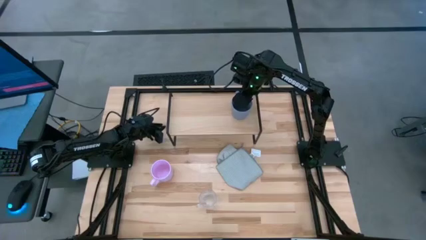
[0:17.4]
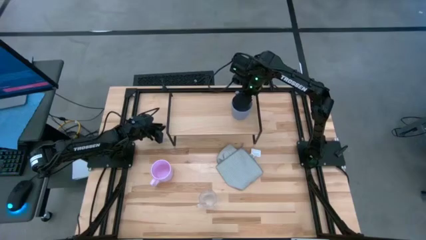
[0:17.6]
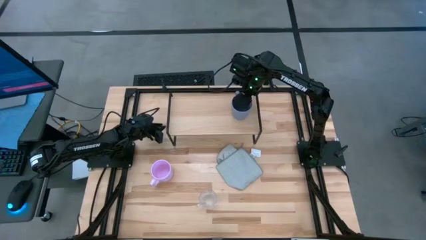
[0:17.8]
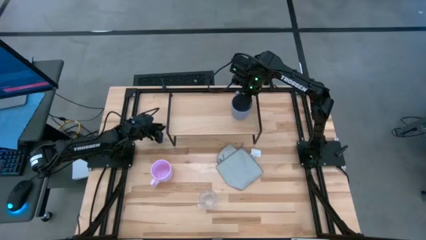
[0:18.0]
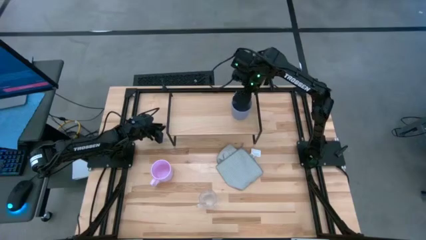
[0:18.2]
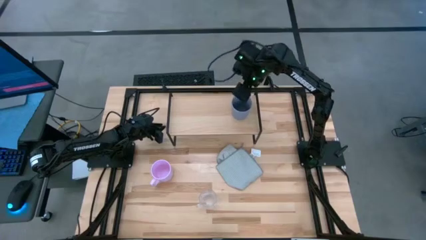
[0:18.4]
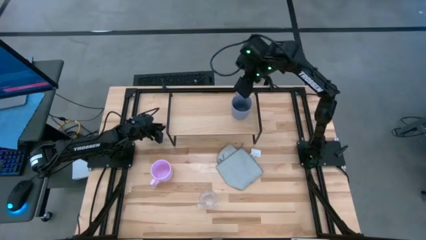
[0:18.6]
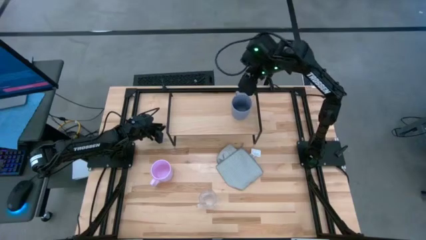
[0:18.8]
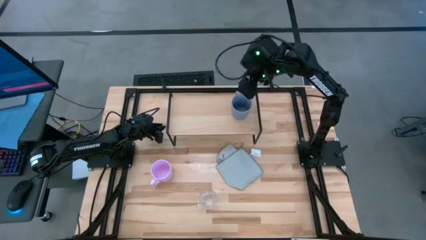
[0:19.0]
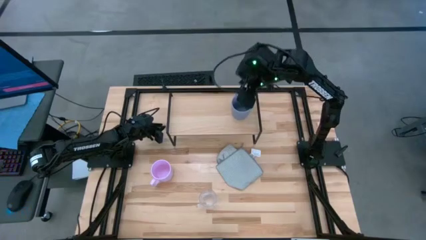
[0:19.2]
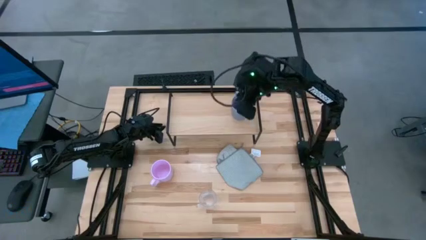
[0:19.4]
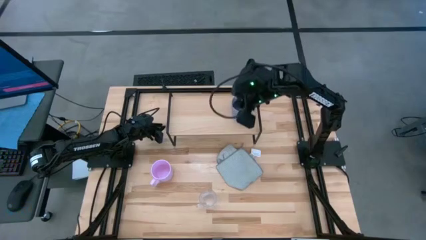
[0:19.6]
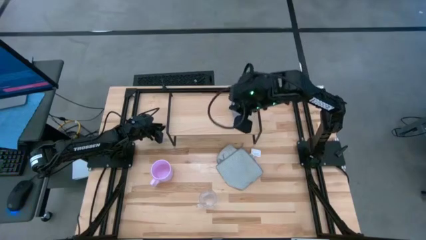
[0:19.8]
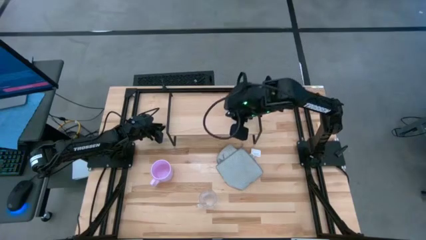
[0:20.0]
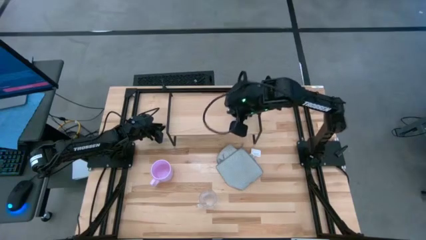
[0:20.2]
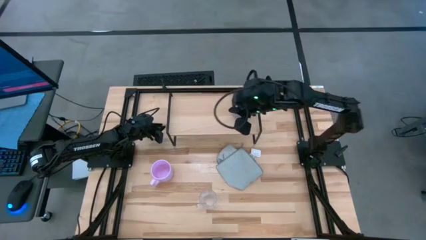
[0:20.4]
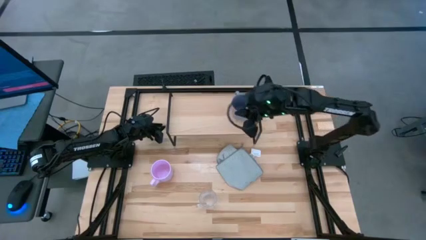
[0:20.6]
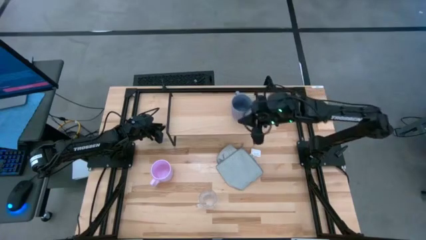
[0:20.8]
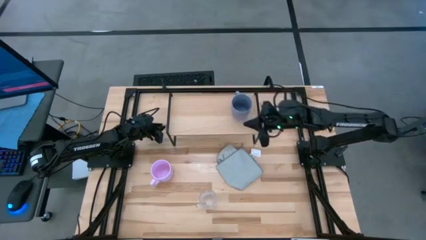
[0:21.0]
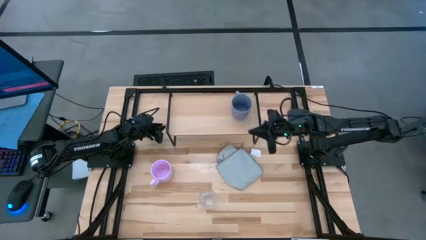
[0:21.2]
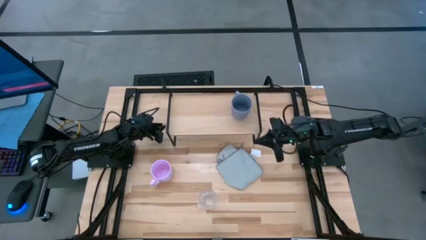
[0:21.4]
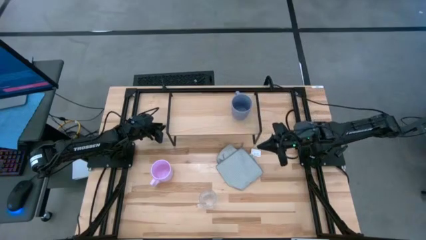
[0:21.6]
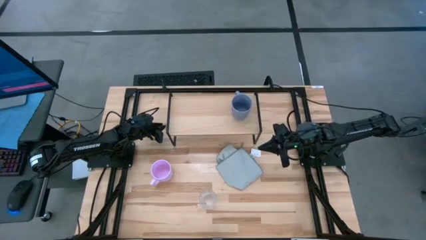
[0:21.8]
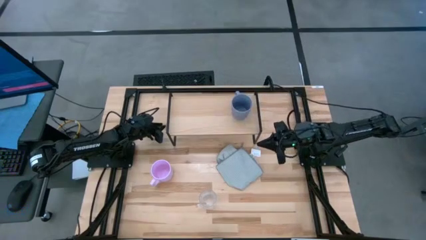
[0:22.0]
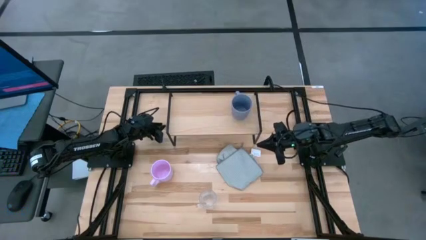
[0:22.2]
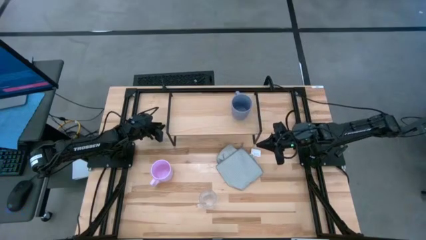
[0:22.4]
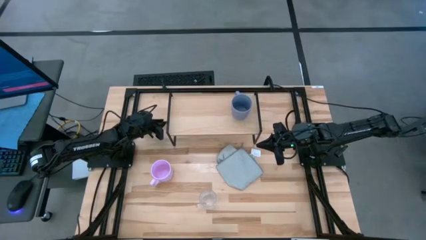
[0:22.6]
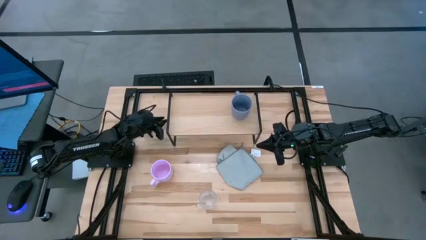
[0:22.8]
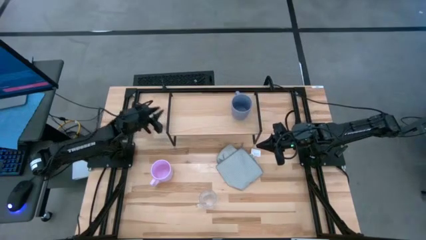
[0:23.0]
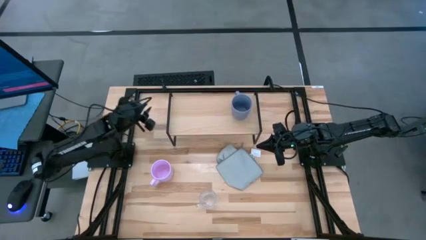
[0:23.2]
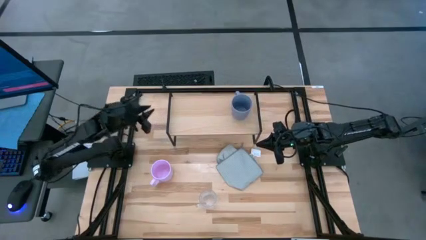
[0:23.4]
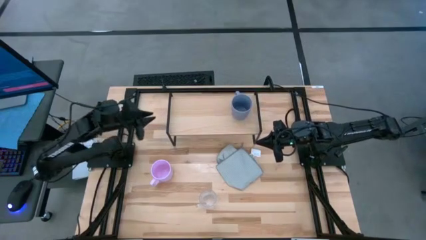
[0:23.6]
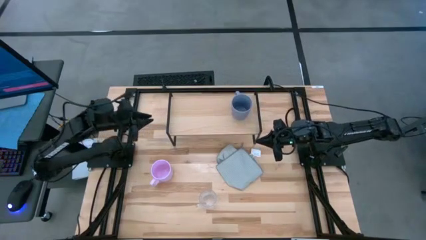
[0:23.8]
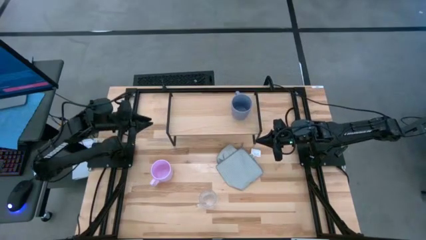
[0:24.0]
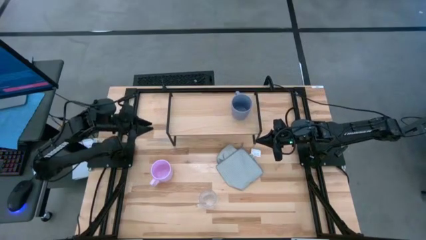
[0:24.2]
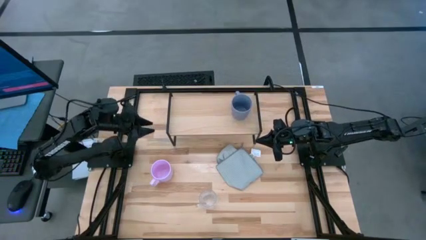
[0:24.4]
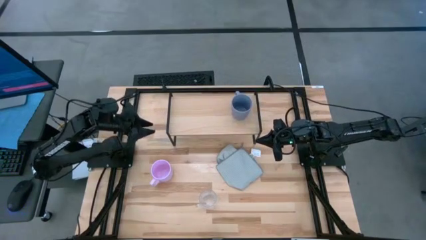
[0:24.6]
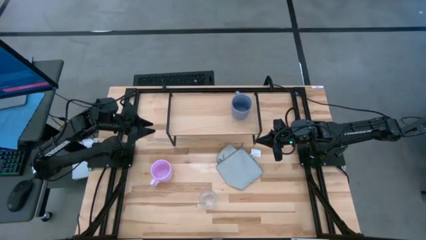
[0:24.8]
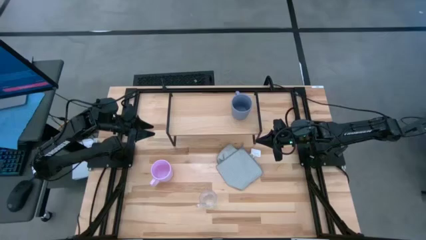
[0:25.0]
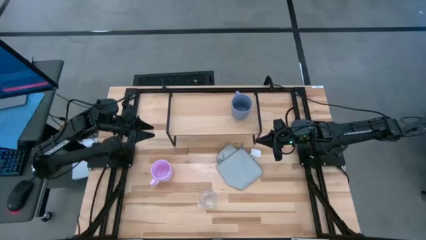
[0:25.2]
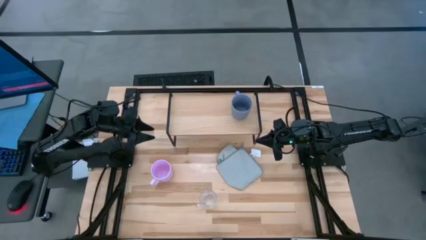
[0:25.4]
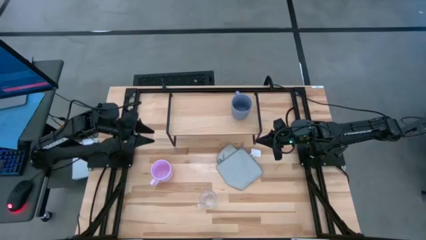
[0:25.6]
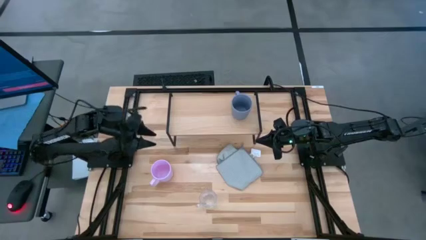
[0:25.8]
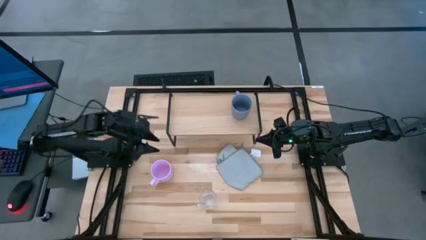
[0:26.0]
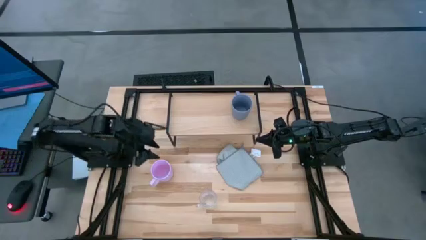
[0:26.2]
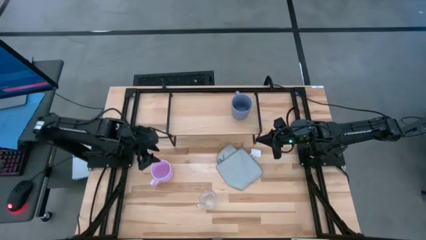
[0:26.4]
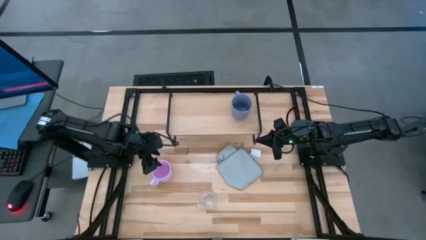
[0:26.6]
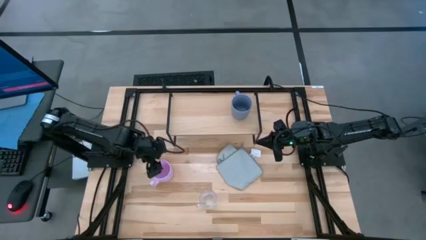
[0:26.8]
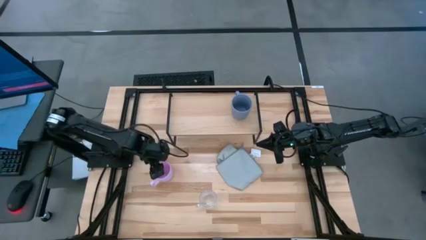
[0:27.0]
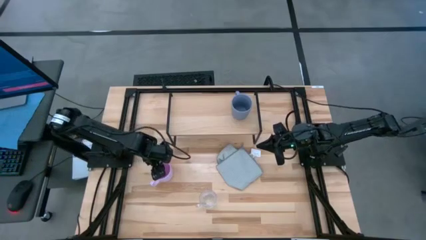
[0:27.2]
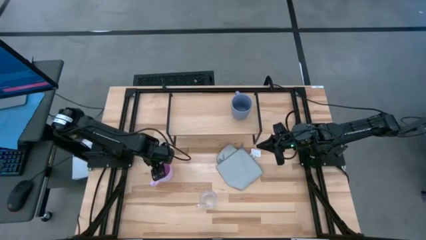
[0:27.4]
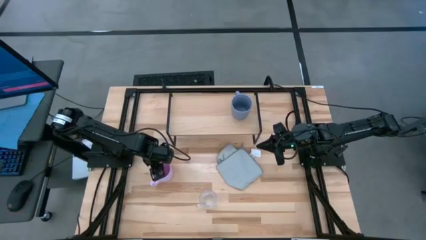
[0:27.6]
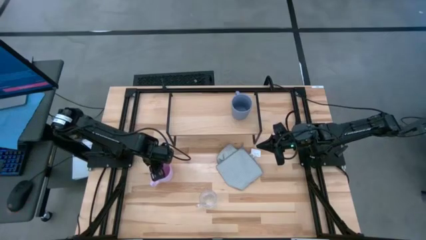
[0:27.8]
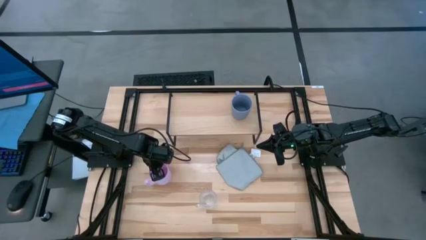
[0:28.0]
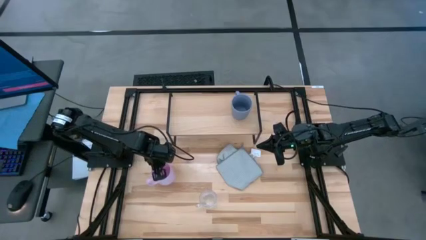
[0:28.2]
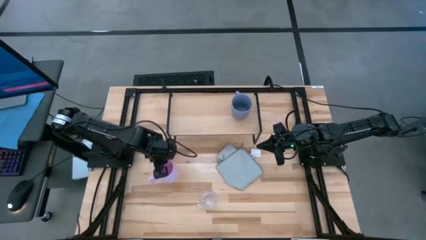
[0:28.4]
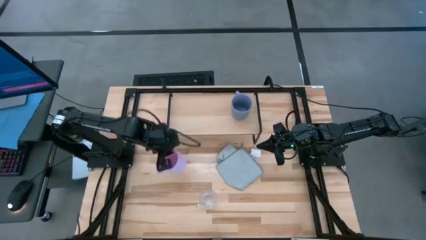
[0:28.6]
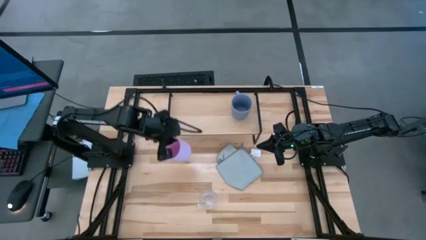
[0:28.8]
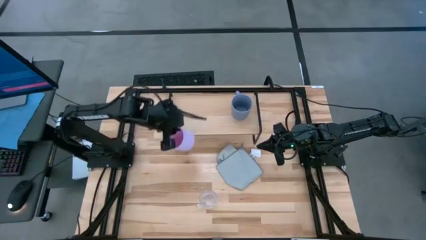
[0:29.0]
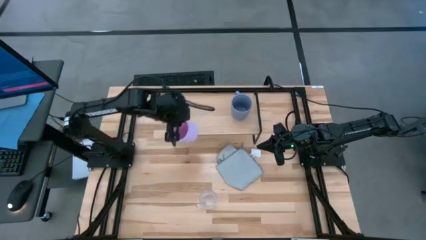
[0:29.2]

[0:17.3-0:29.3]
Task: Stack small to large cups/mugs on shelf
Put the pink mug on the shelf
